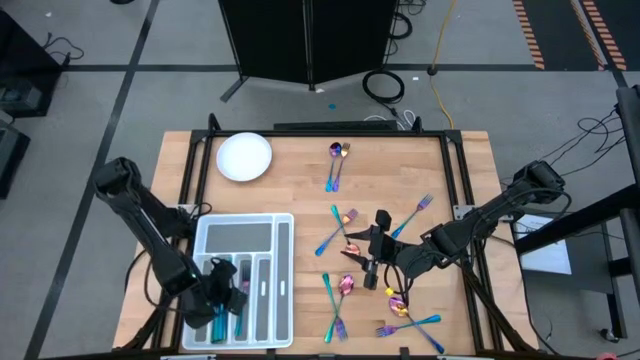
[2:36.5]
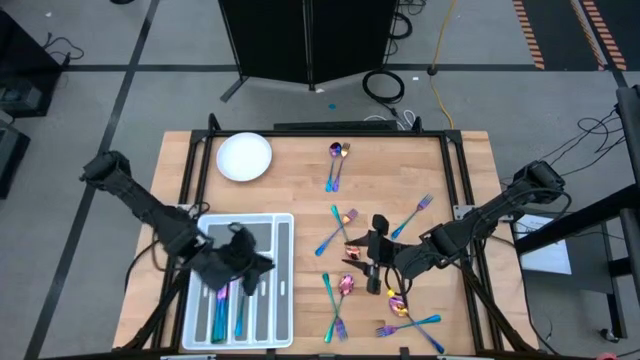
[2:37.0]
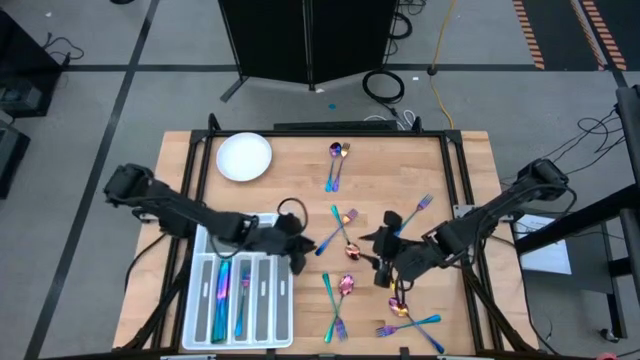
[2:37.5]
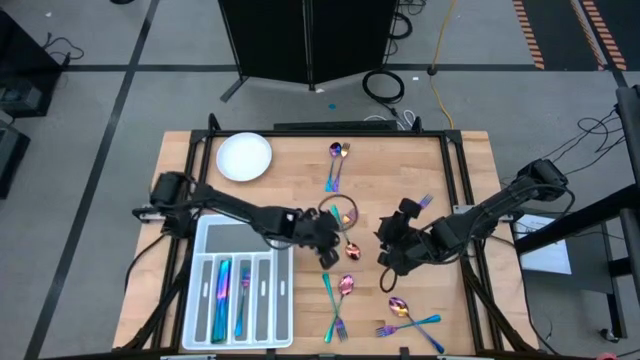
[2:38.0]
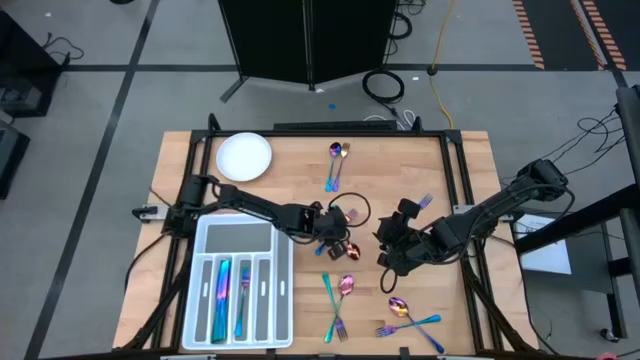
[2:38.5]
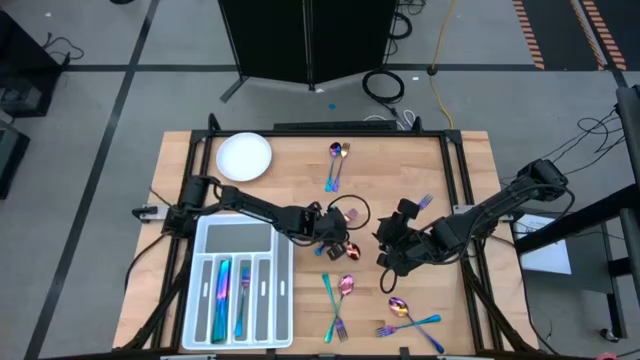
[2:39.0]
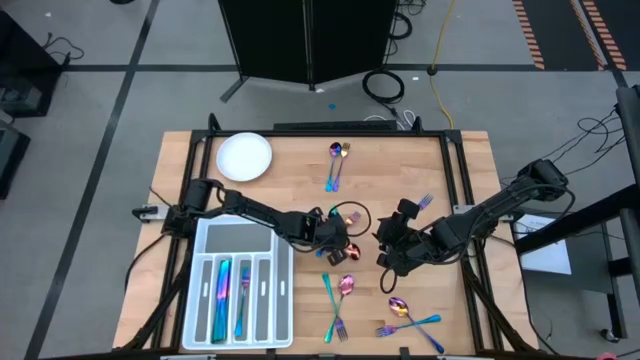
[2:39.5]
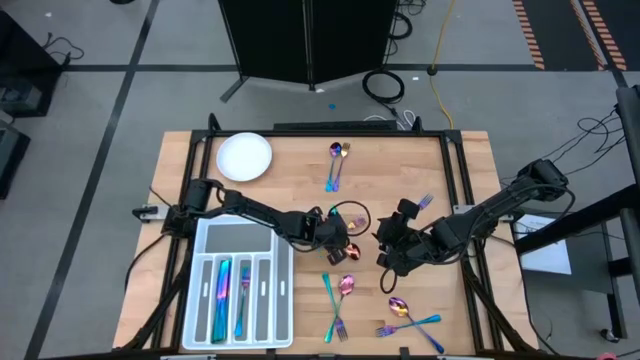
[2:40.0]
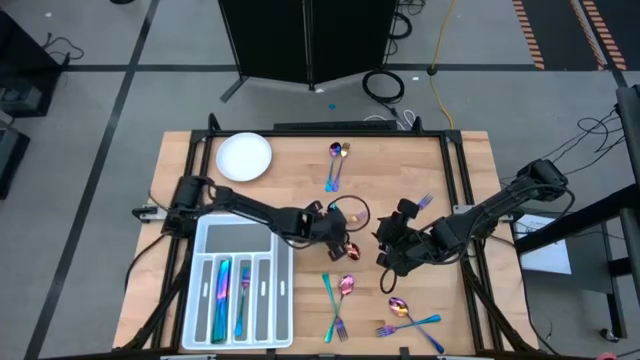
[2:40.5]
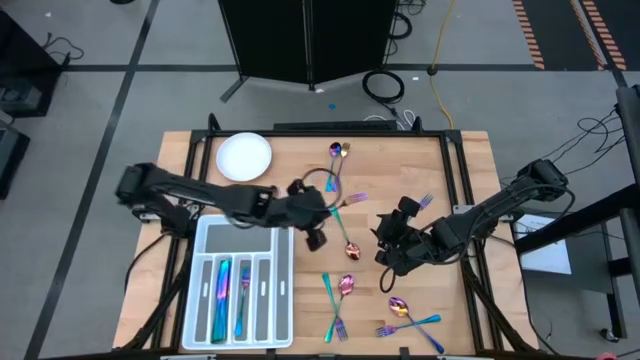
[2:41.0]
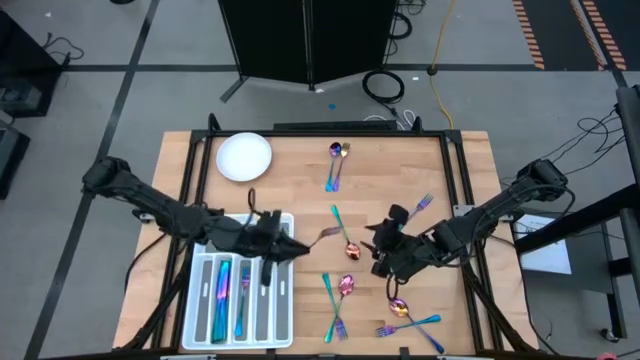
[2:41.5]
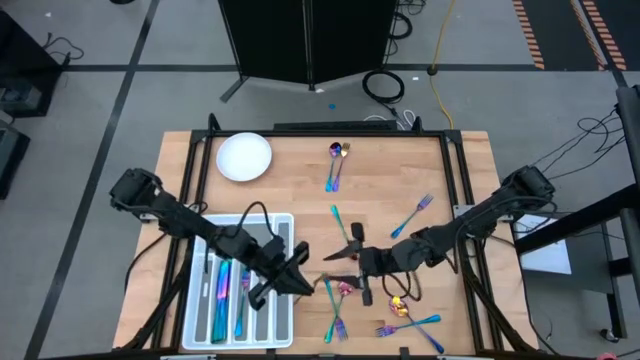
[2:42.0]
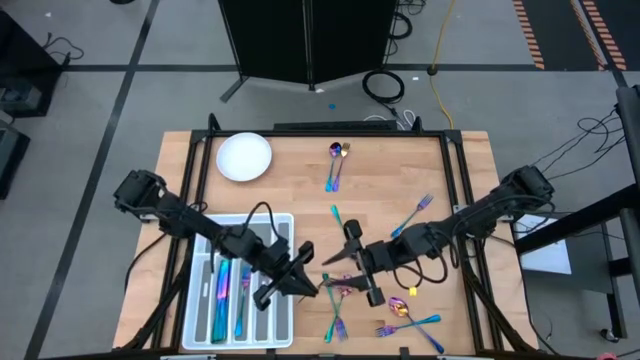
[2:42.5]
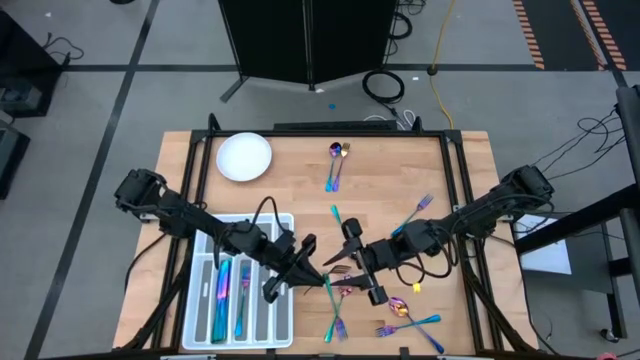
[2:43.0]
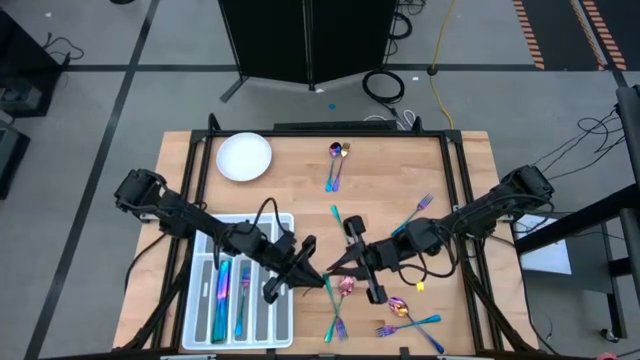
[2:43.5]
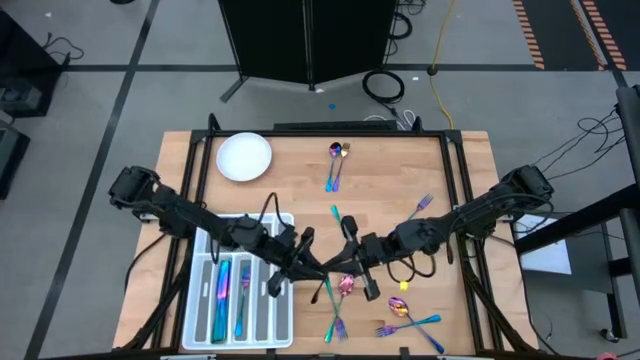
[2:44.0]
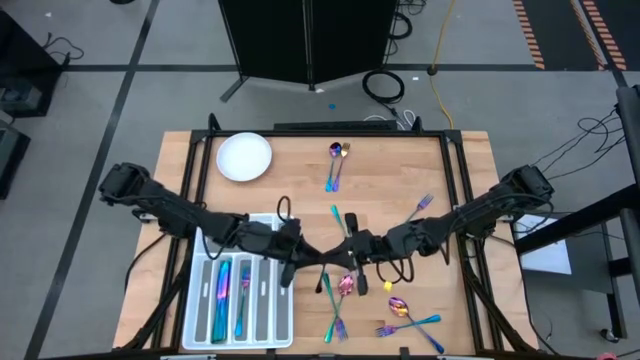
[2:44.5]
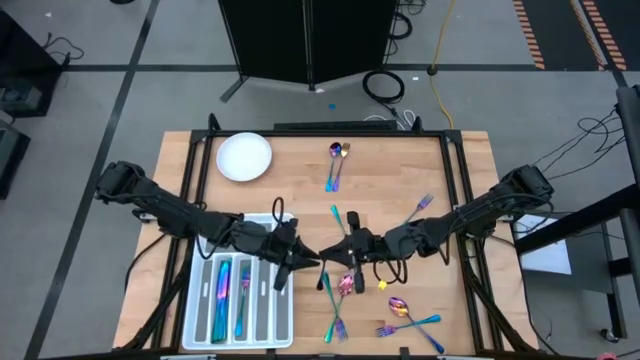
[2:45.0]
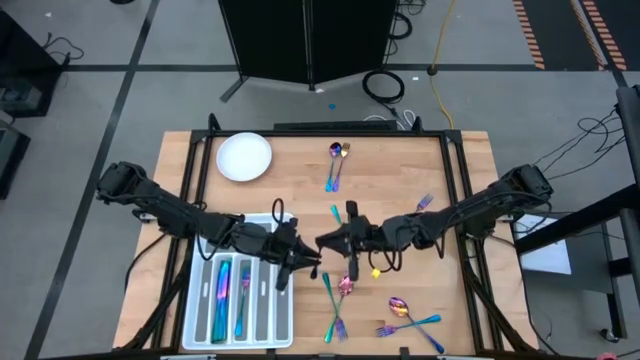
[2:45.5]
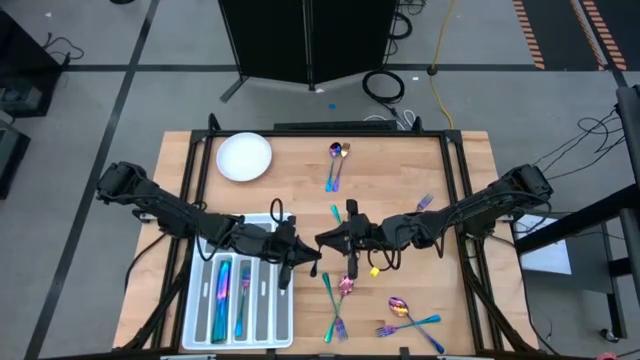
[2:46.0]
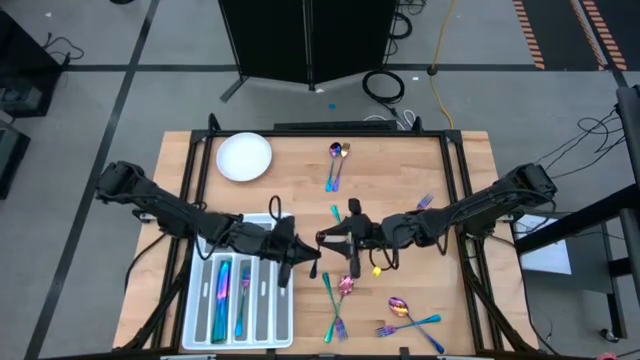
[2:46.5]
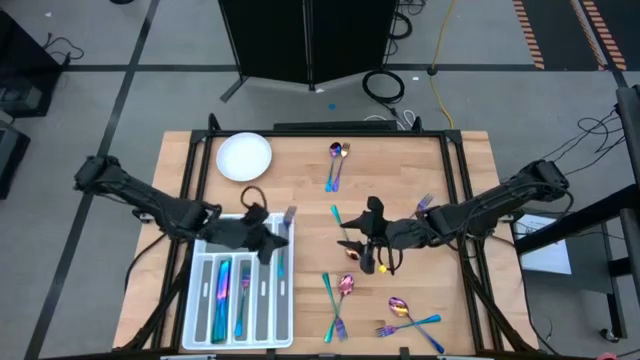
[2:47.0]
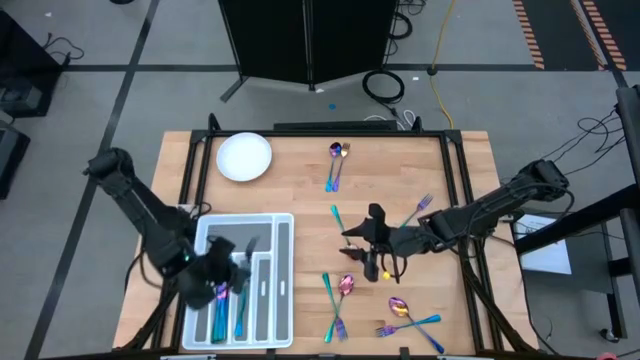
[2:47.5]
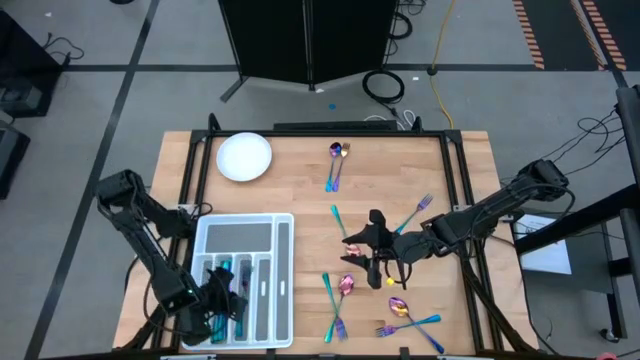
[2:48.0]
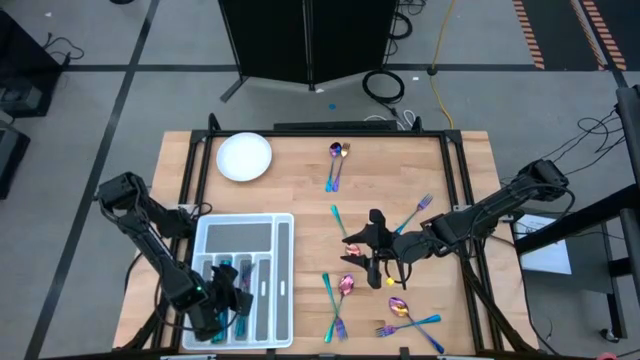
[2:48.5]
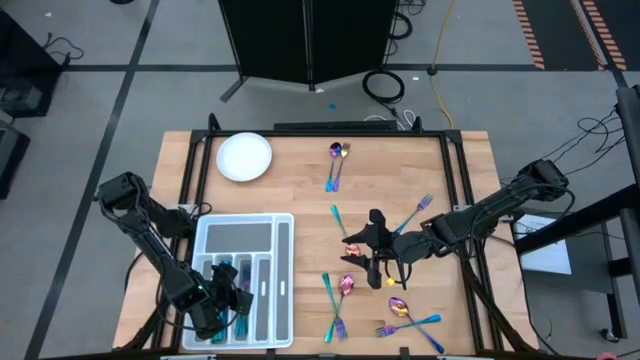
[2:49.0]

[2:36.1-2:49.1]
Task: Sort silverware
Put the iridescent blue fork in the silverware tray

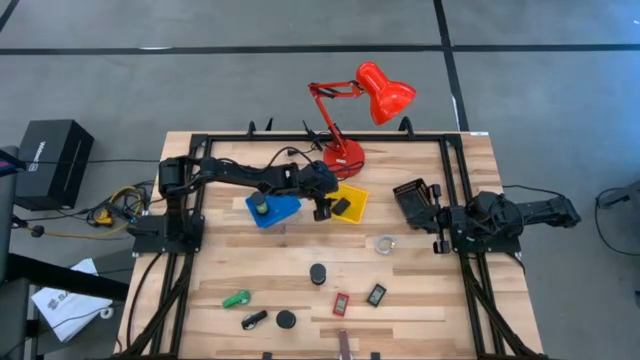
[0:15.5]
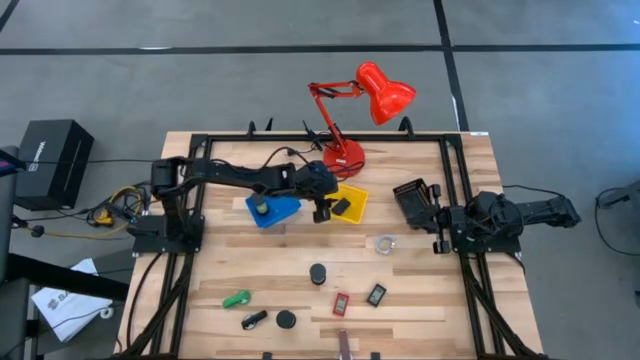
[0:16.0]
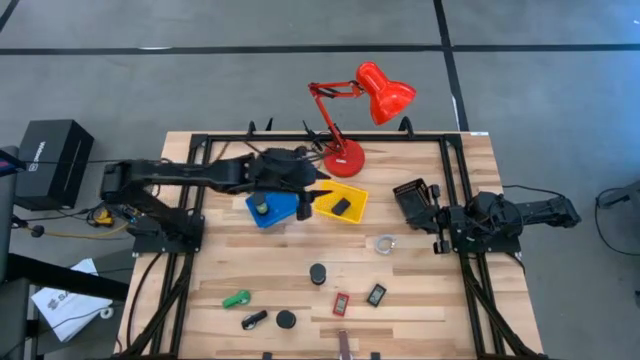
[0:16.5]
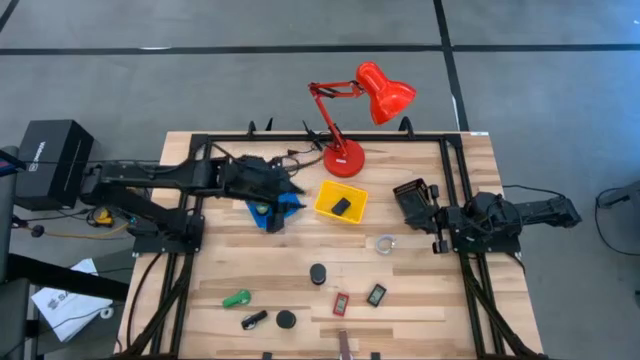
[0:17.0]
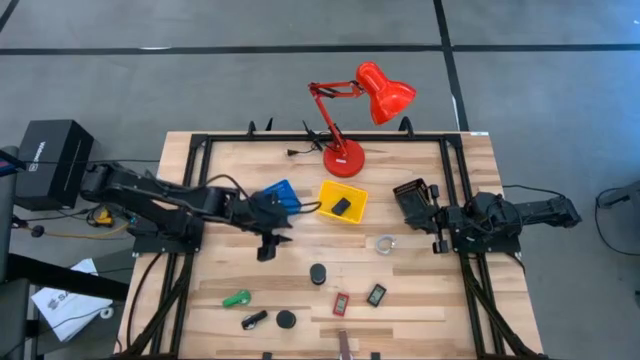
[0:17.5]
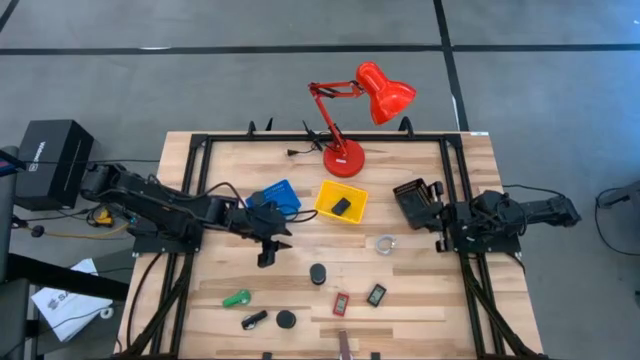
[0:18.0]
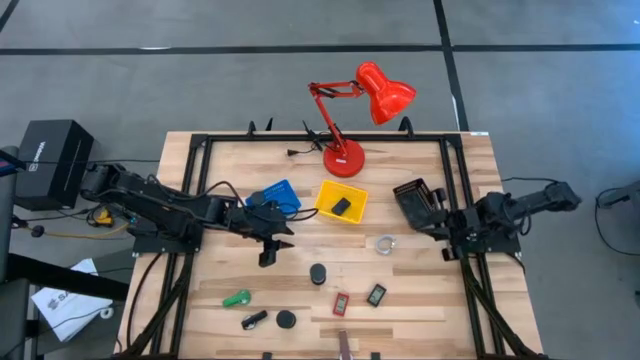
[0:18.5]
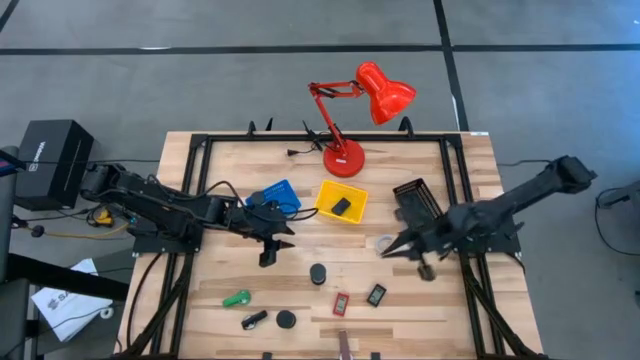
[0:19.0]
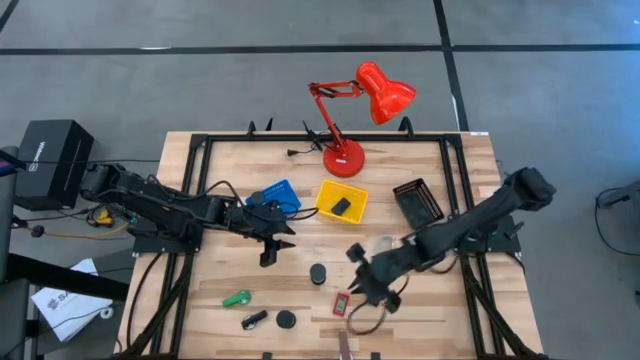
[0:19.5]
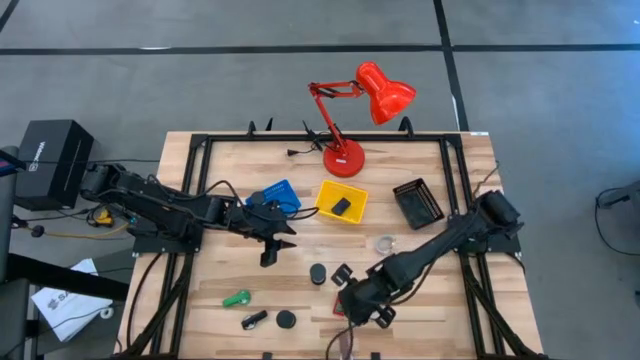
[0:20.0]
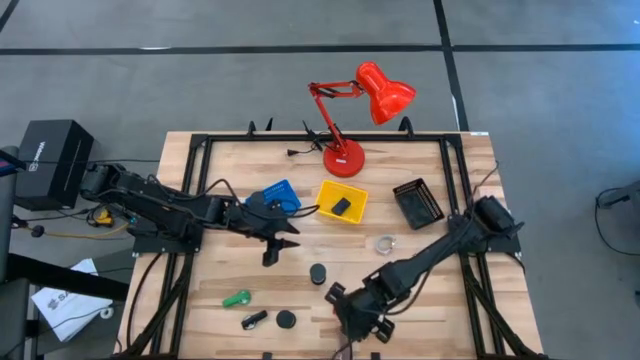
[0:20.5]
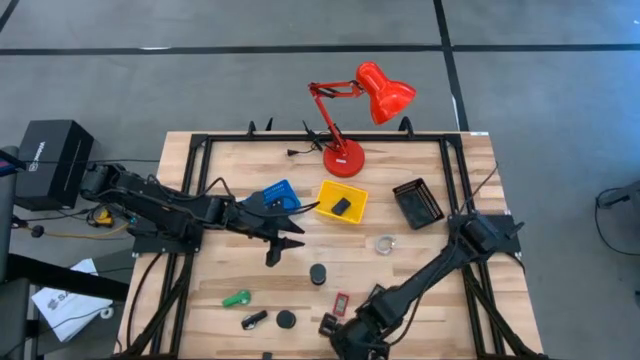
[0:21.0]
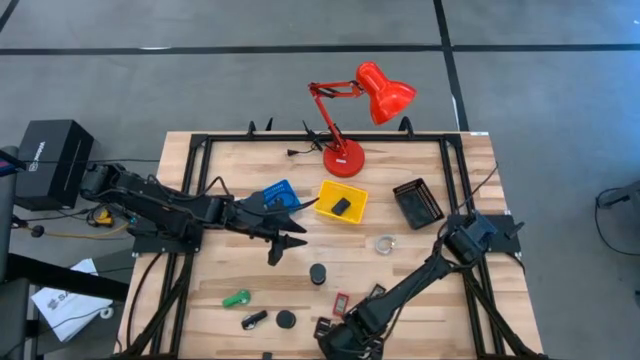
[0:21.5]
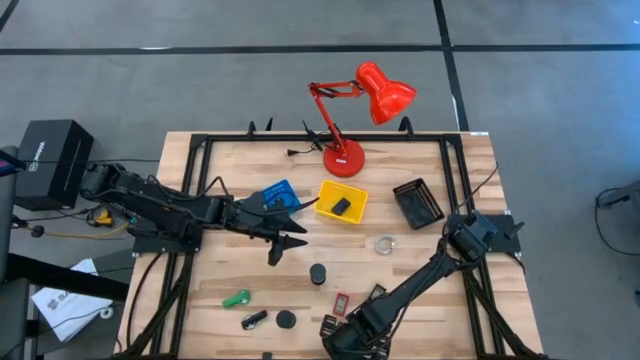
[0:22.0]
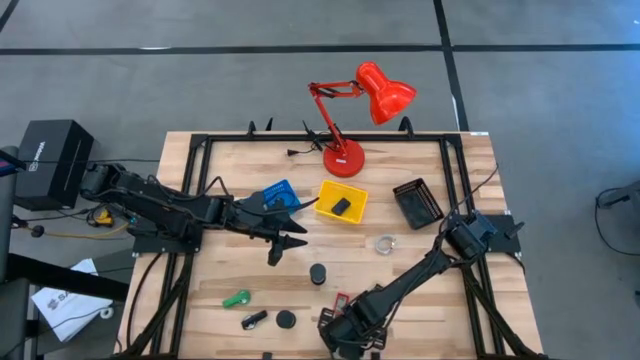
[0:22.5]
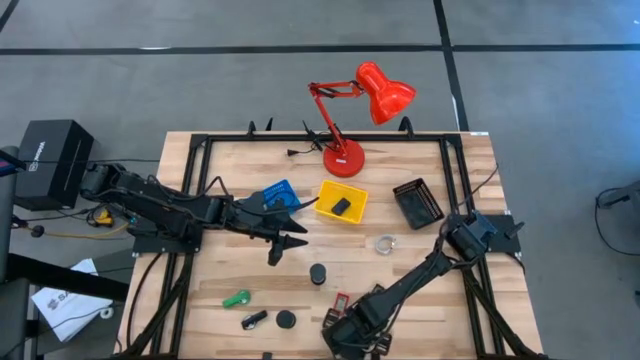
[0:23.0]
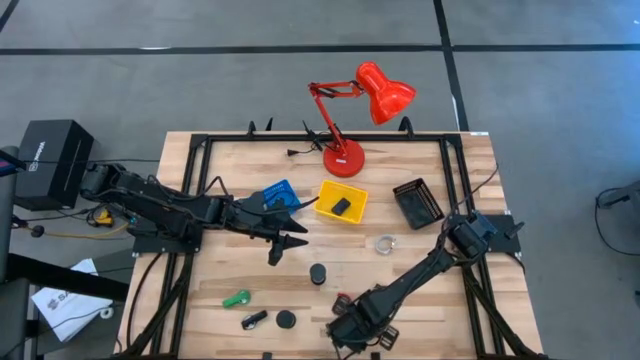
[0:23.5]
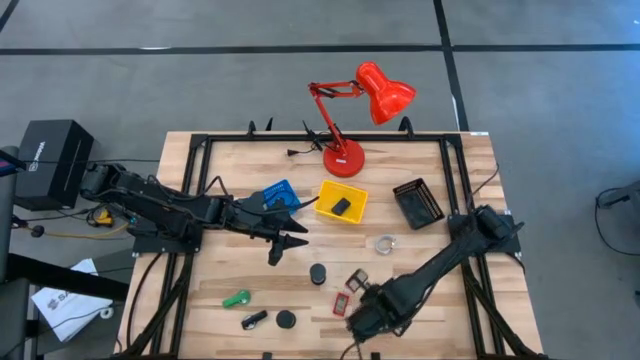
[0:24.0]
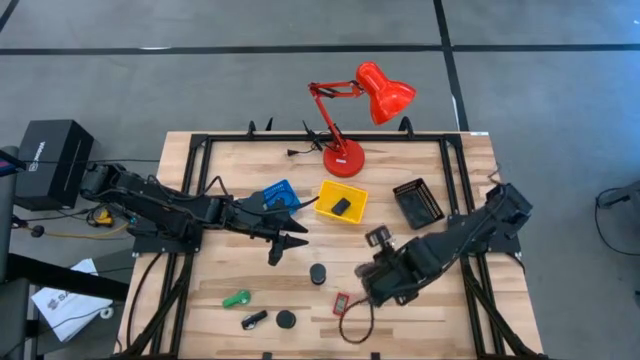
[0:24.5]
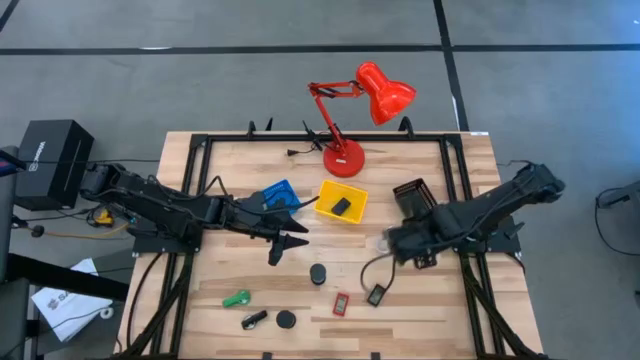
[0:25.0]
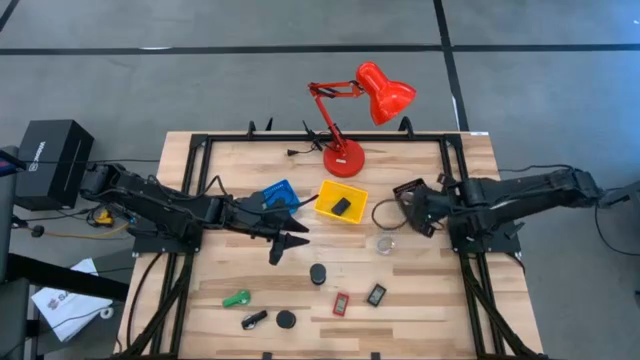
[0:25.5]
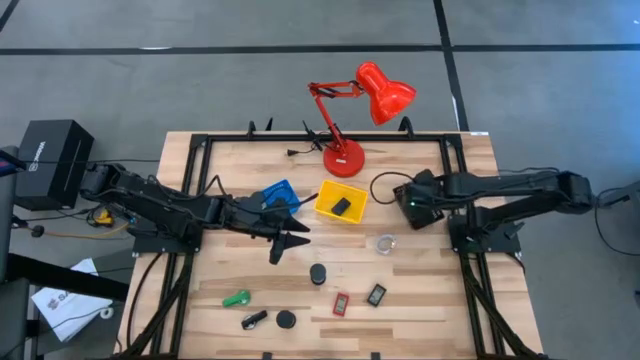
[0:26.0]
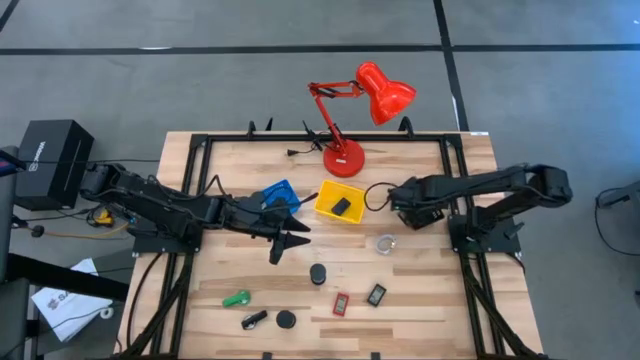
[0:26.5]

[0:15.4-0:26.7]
Task: Pick & Place Office items
Put the brown wrist watch into the black bin
